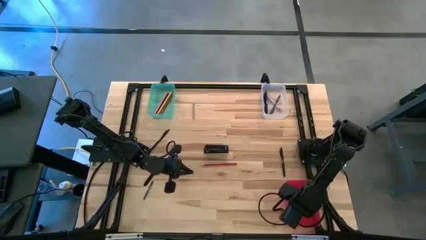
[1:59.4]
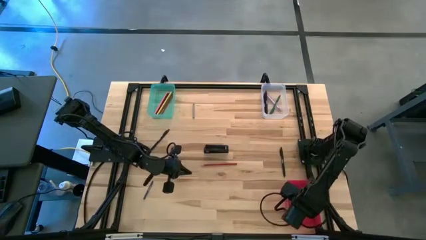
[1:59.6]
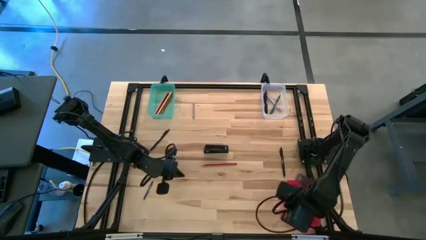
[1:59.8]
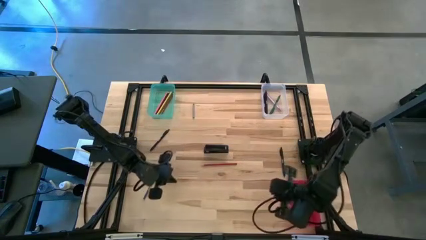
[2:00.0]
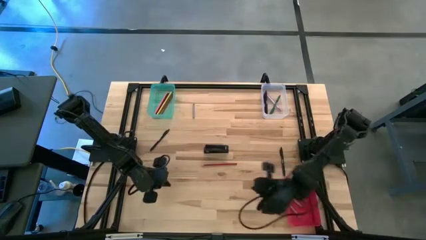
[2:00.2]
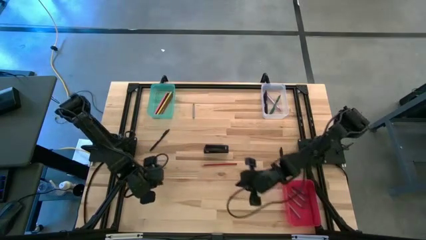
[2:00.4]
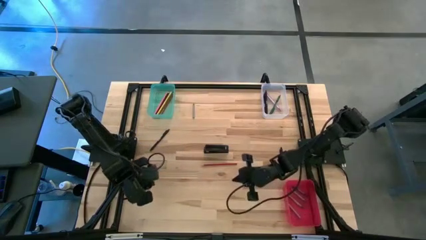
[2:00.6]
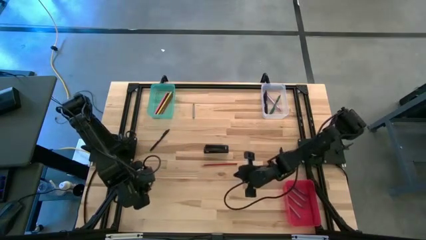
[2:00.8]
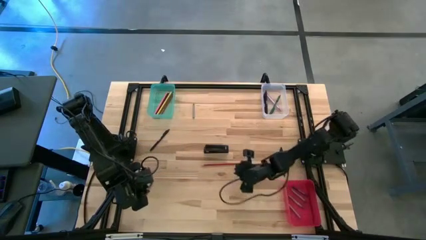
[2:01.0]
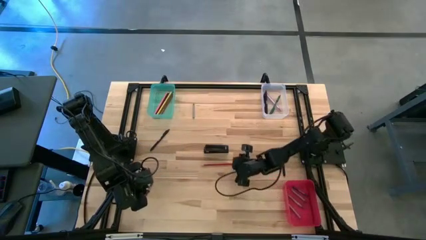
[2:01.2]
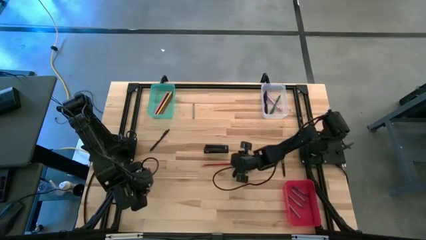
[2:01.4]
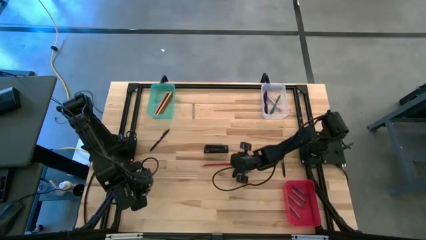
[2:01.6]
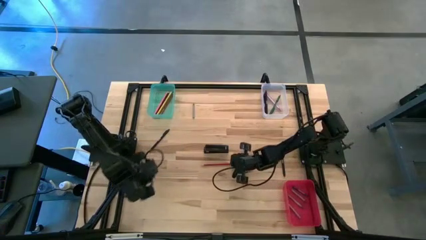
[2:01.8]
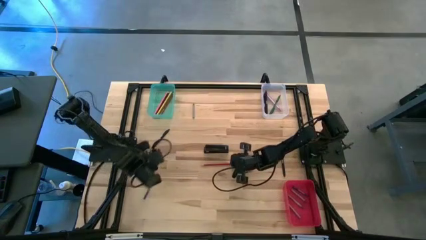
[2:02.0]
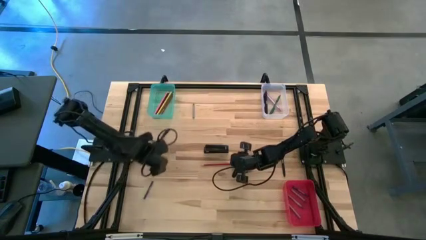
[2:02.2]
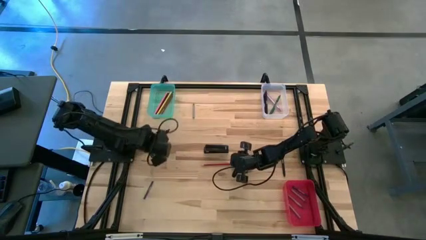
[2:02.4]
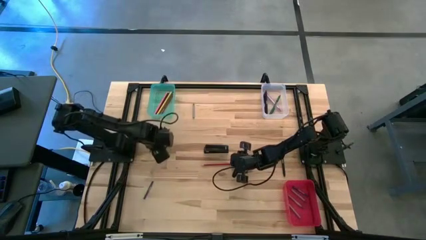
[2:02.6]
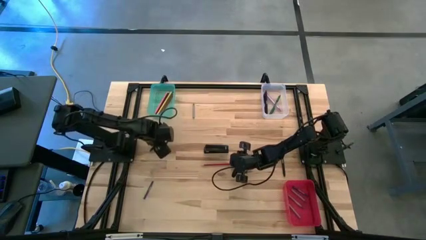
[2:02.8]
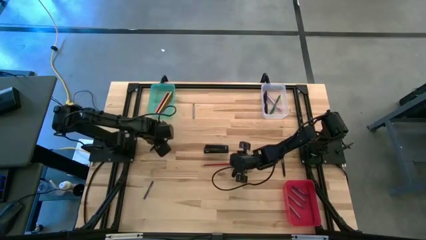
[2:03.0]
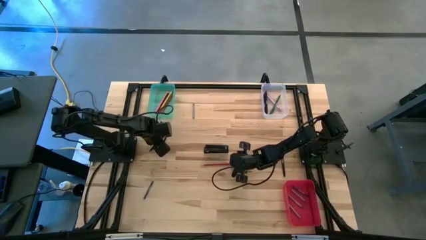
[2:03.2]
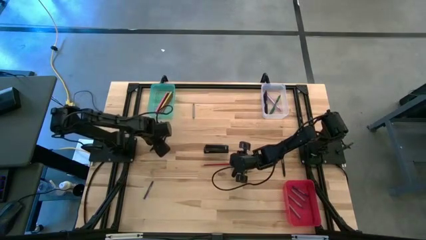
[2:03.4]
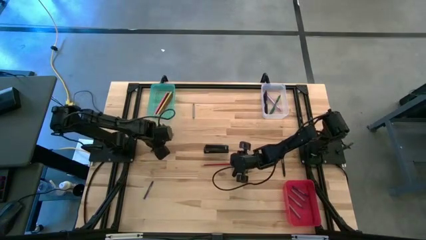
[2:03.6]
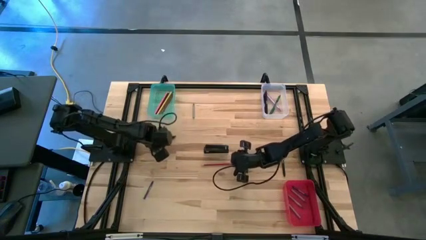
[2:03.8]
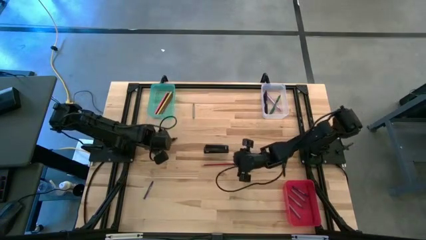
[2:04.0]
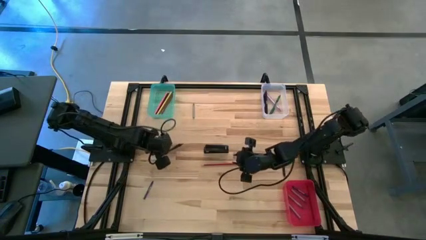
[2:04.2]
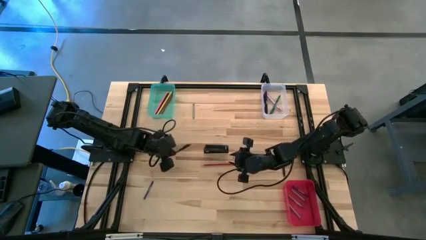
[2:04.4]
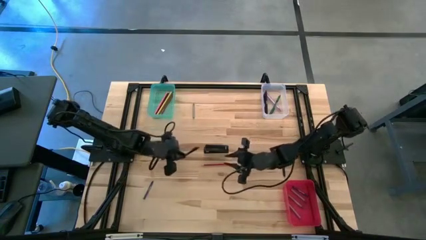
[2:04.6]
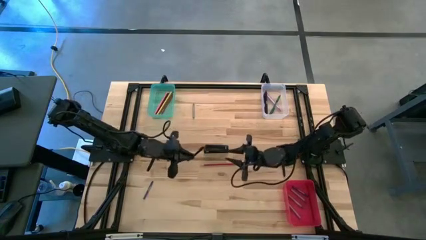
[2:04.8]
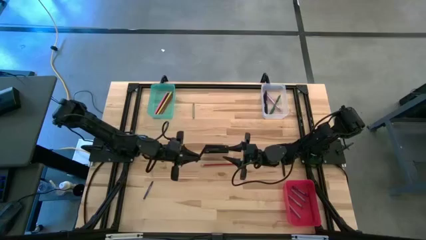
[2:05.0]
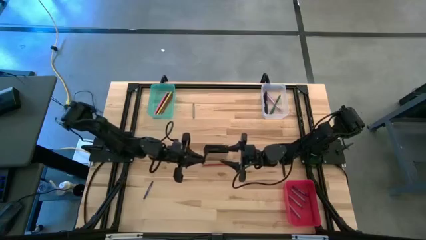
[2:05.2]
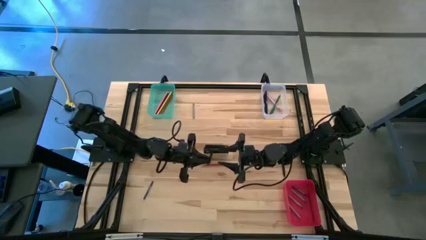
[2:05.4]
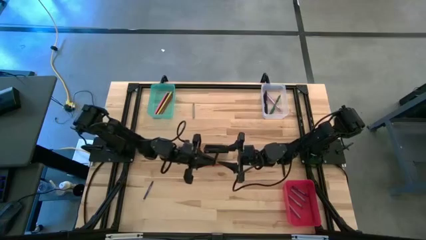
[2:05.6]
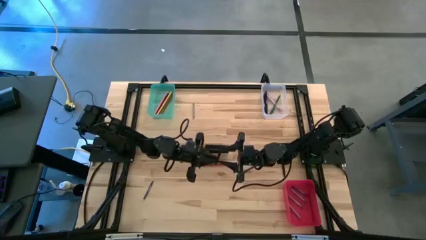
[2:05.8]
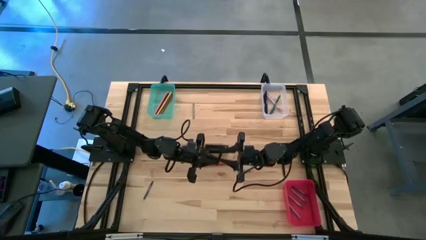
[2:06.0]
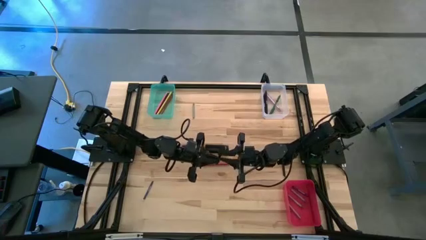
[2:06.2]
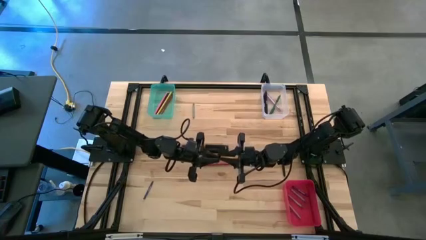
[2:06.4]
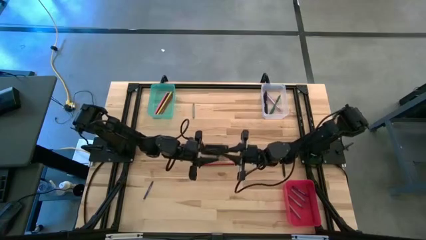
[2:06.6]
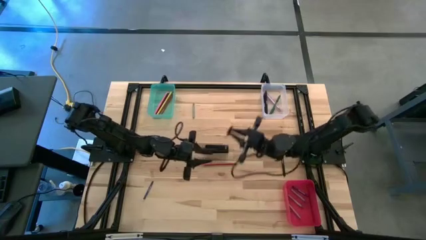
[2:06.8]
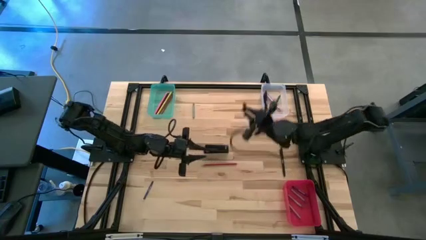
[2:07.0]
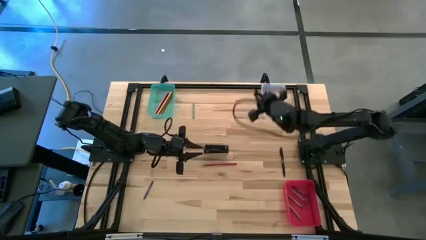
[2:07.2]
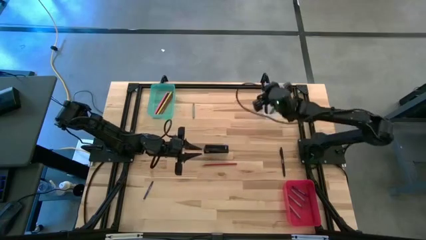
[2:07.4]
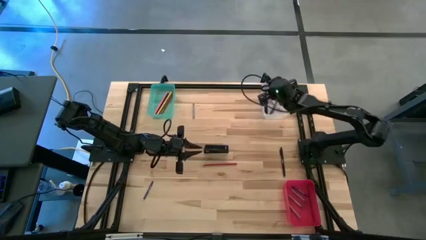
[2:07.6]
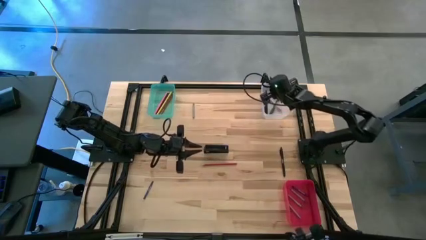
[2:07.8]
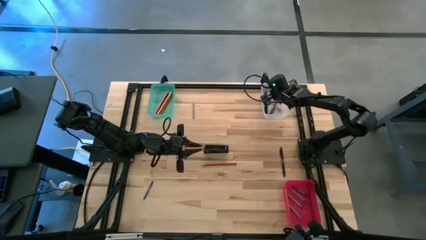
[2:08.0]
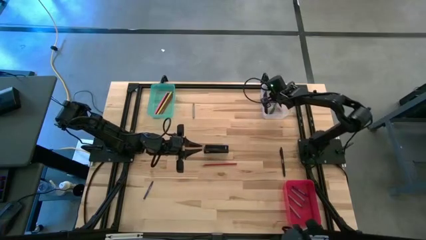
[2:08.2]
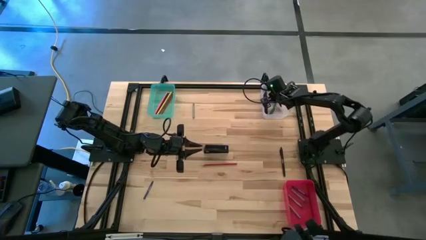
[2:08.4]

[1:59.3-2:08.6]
Task: Sort crayons/erasers/pens/pencils in bins
Put the black pen into the transparent bin

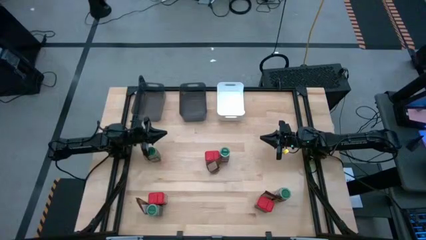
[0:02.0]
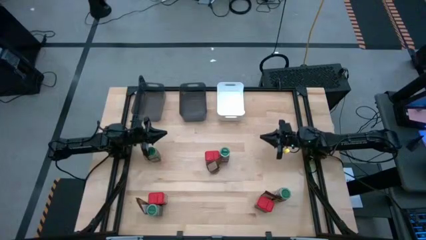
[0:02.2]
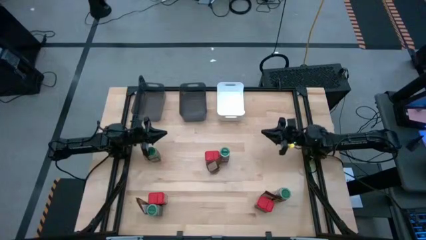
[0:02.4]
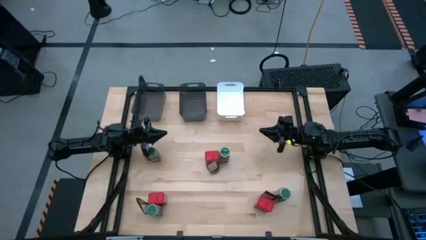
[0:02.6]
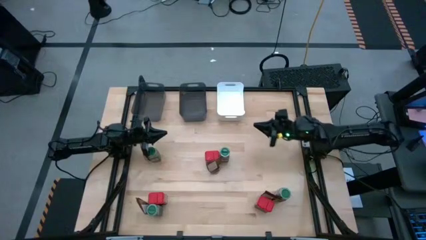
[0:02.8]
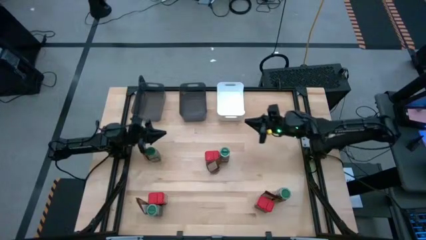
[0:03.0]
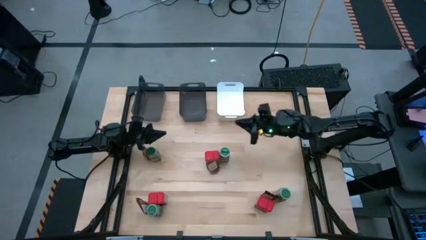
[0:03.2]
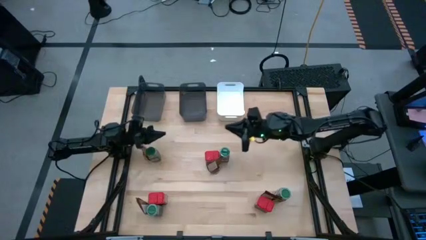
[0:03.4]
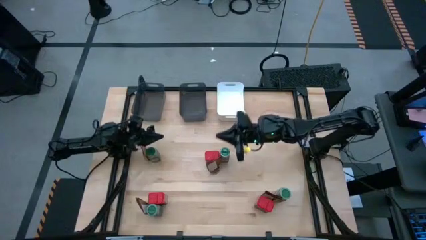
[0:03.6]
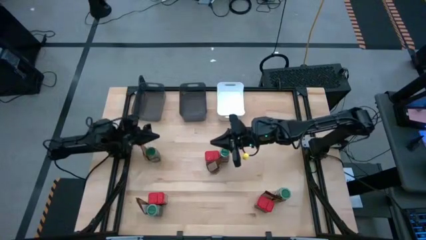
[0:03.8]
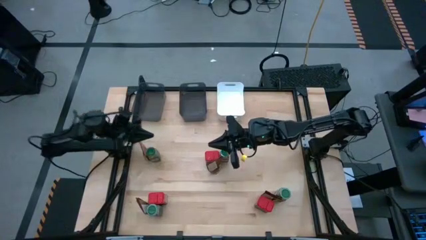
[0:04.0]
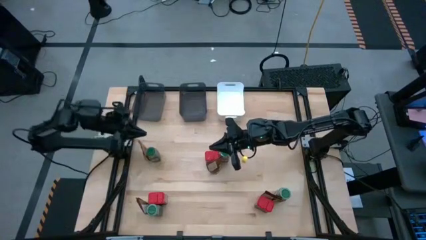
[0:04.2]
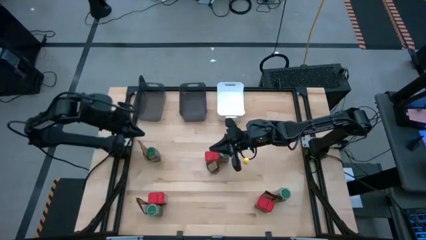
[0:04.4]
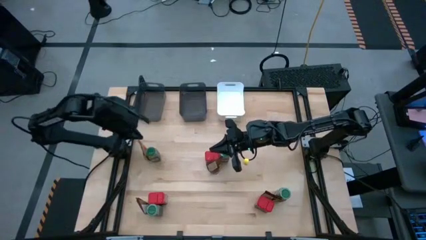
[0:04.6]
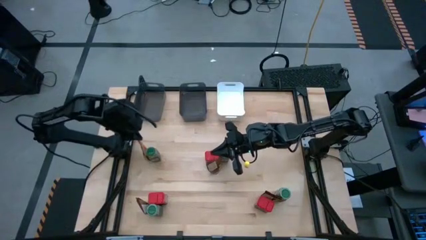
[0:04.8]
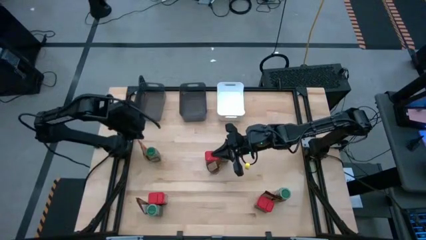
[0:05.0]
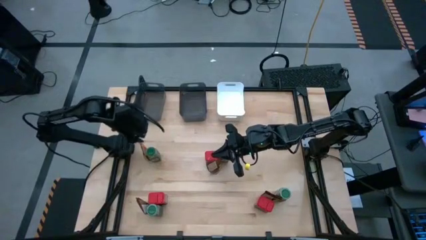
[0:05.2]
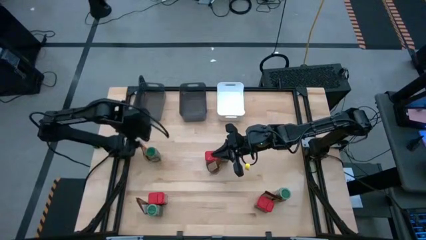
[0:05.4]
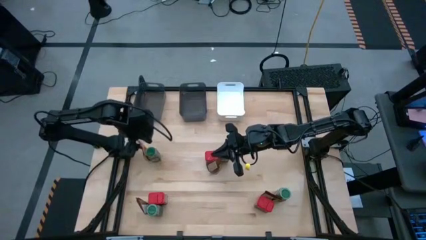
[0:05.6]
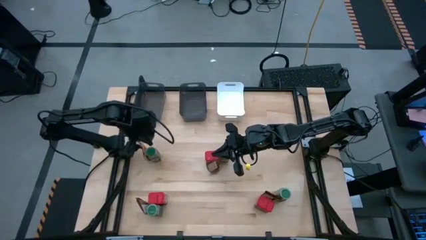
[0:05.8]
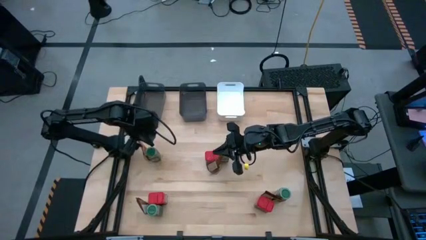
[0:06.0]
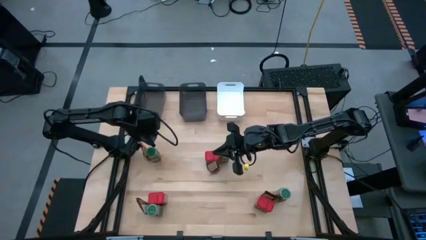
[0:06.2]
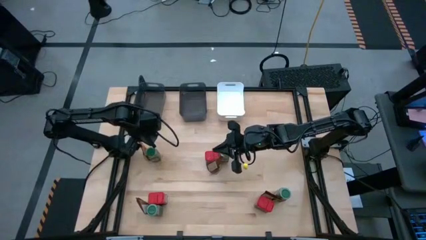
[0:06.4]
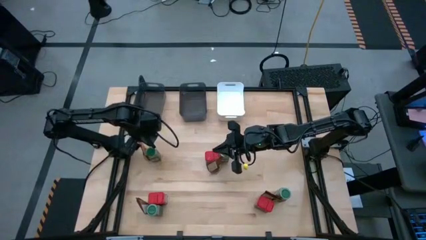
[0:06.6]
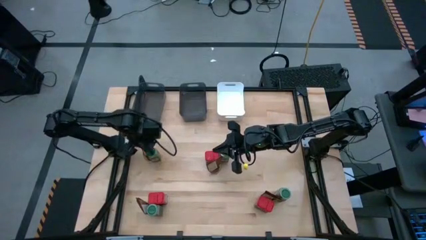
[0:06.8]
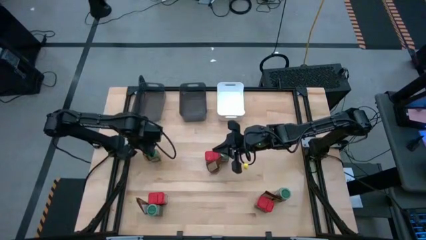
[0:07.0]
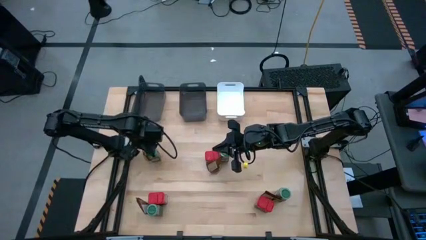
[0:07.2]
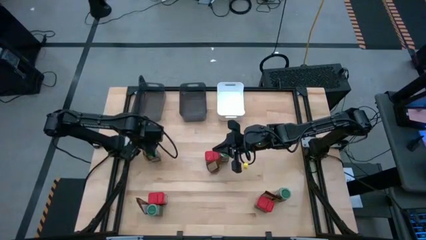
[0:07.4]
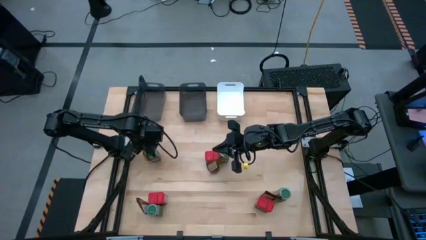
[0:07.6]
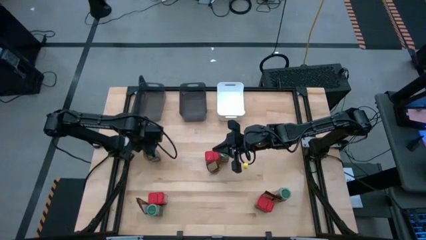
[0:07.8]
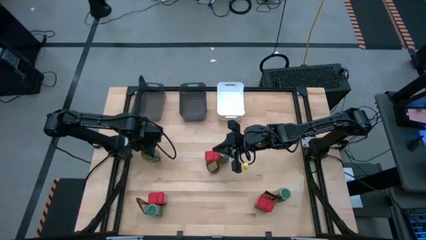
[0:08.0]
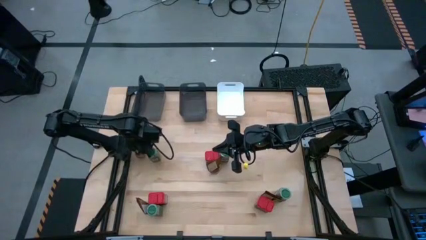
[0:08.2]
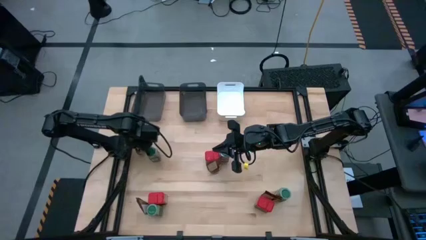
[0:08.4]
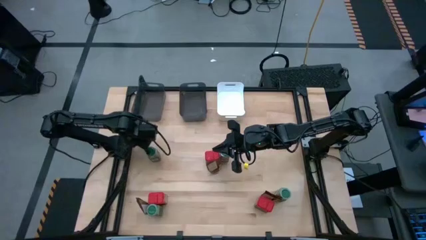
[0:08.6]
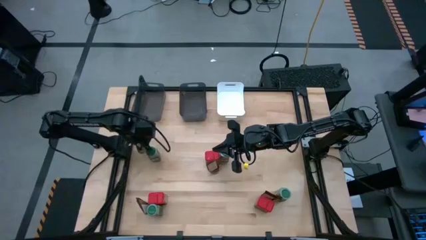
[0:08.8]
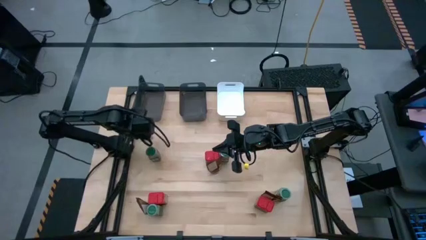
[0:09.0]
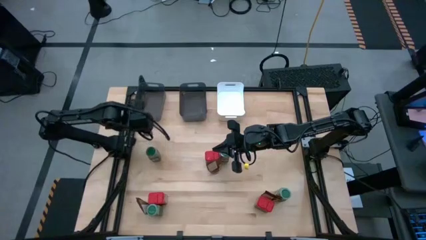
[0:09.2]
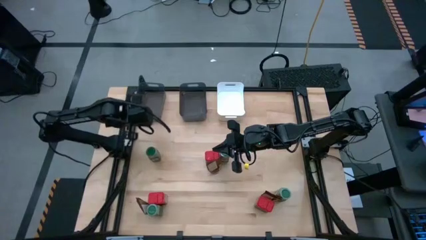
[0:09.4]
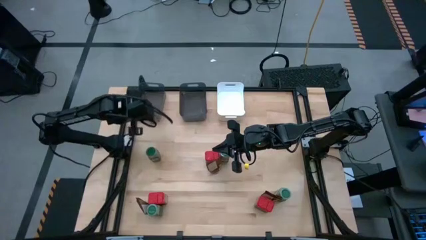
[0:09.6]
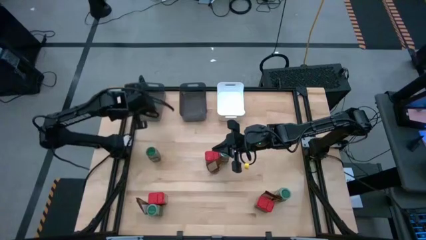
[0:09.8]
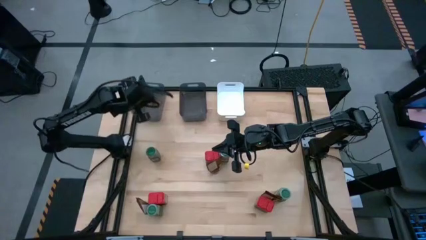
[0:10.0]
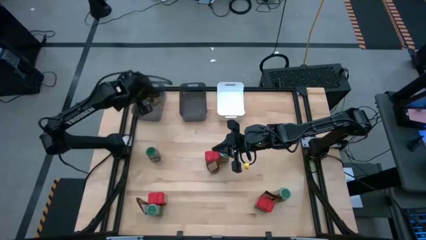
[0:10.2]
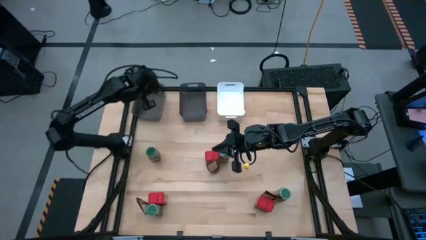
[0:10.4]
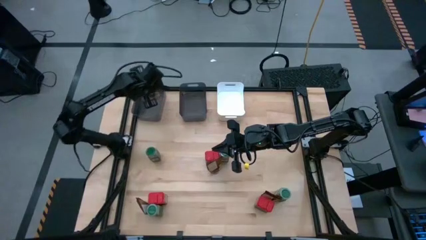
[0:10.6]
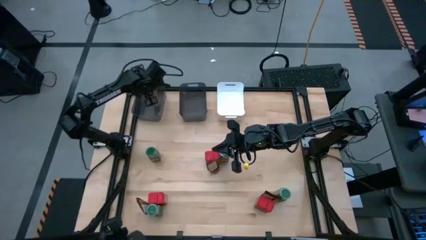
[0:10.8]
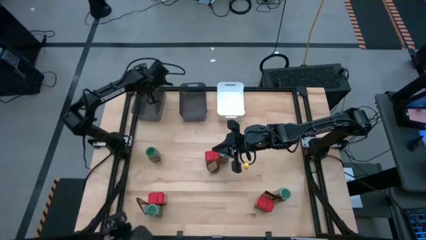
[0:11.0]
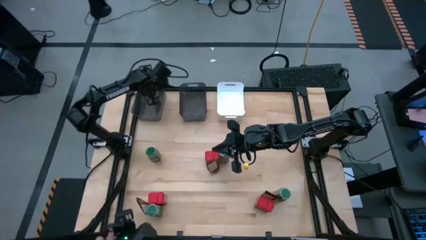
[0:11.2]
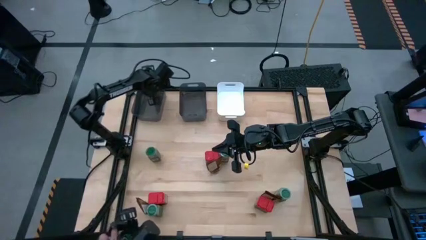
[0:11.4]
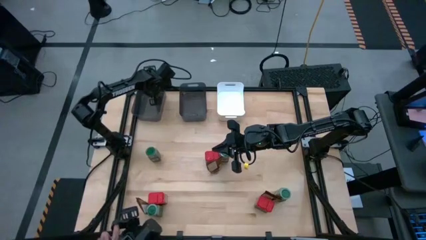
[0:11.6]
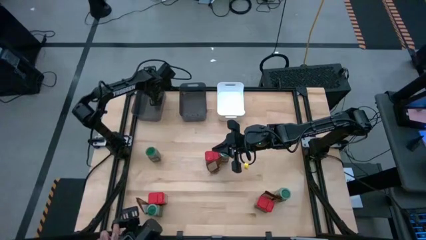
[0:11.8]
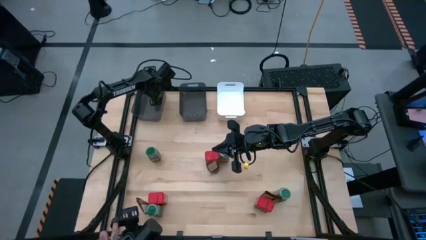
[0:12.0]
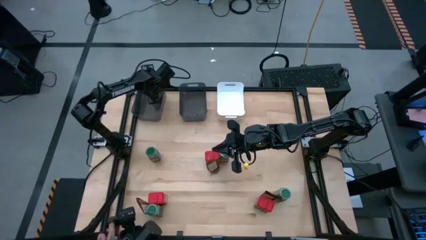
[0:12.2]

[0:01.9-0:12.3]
Task: Sort spices by type
Put the top left brown seasoning sachet into the left black bin
